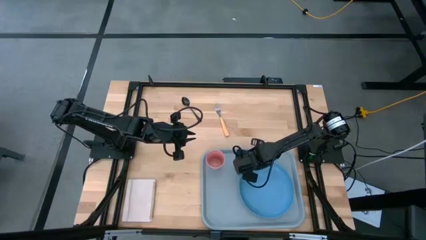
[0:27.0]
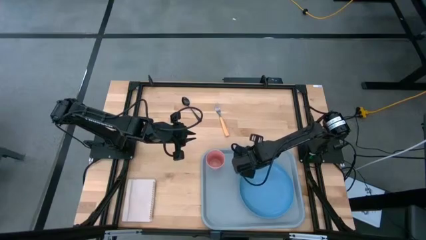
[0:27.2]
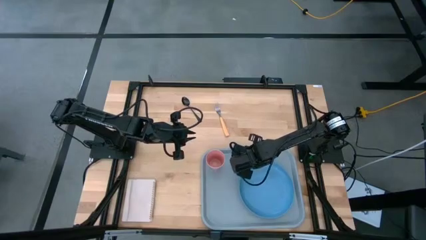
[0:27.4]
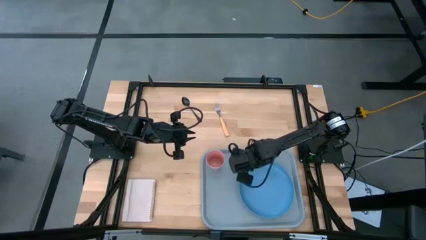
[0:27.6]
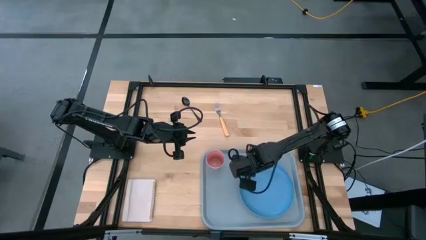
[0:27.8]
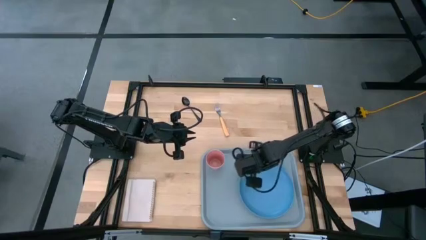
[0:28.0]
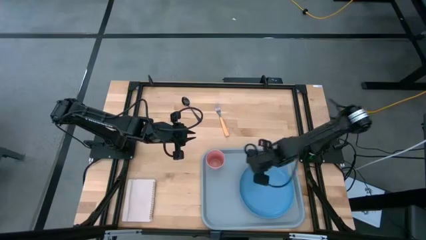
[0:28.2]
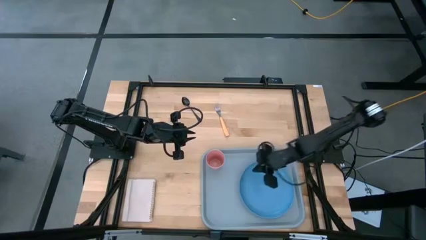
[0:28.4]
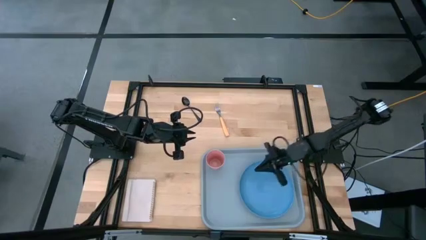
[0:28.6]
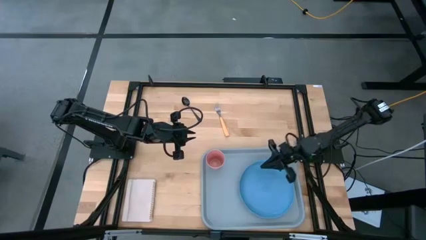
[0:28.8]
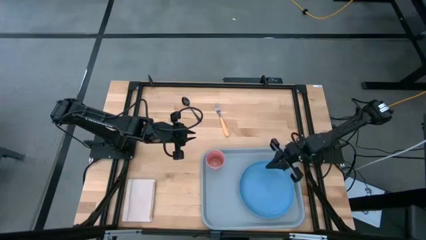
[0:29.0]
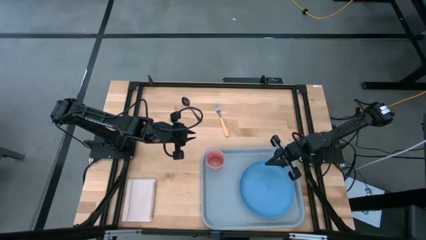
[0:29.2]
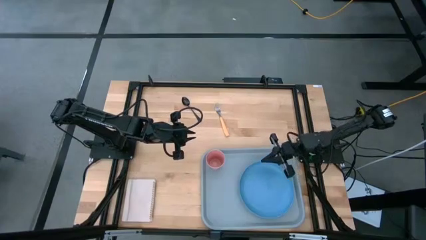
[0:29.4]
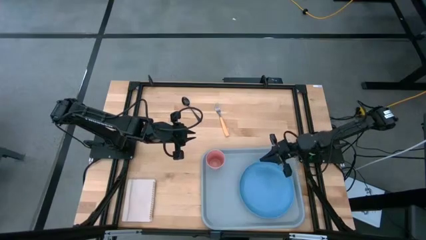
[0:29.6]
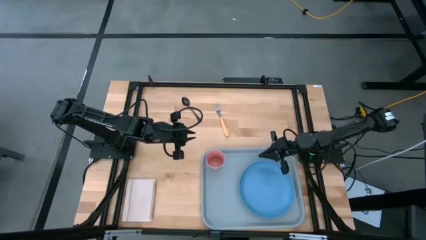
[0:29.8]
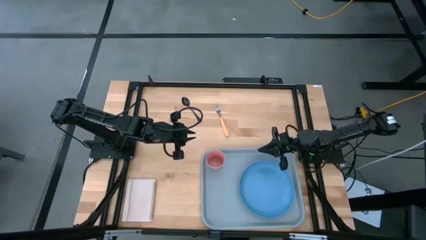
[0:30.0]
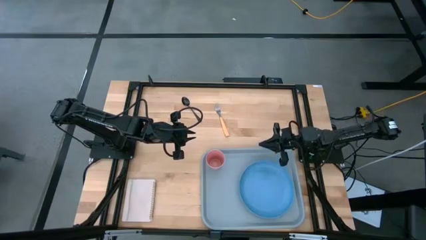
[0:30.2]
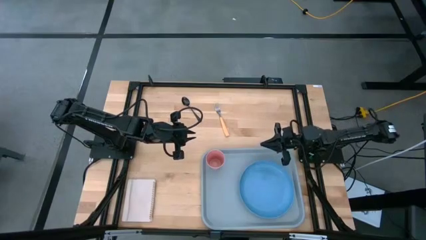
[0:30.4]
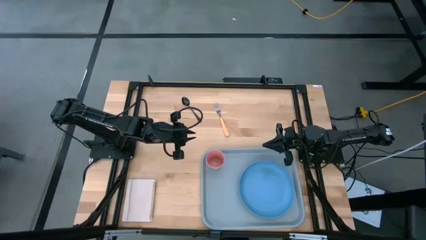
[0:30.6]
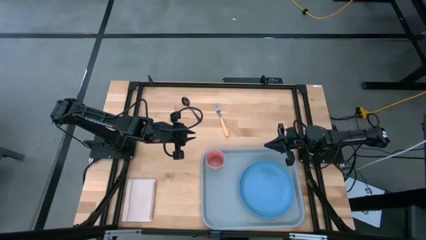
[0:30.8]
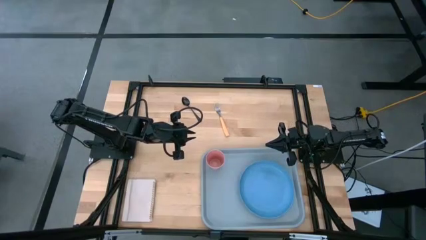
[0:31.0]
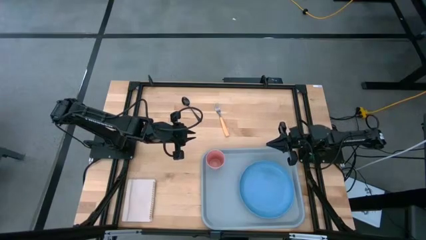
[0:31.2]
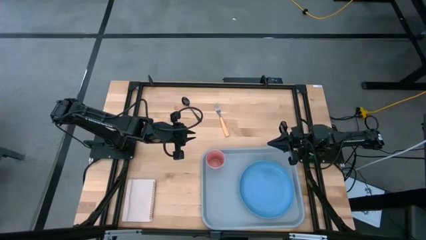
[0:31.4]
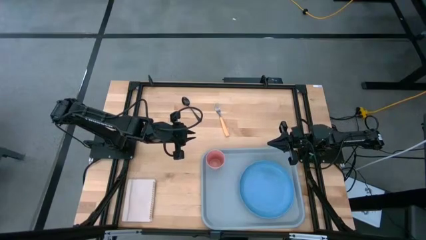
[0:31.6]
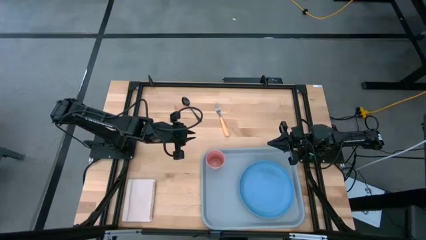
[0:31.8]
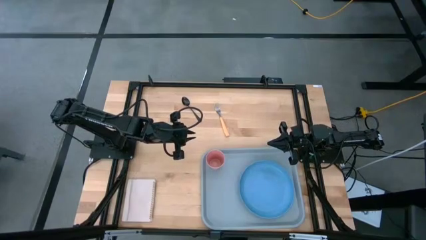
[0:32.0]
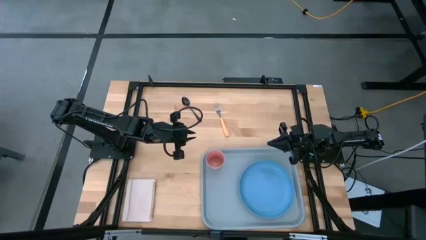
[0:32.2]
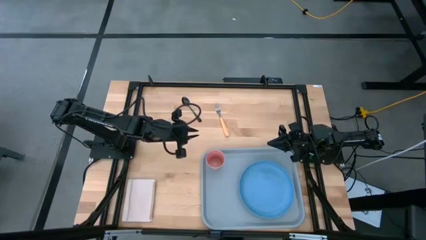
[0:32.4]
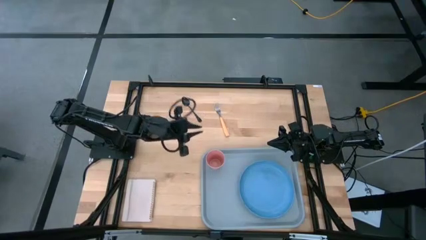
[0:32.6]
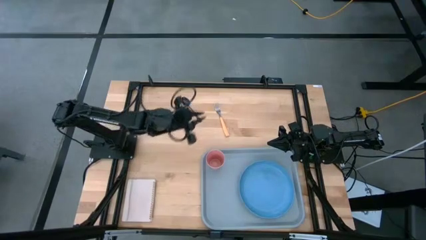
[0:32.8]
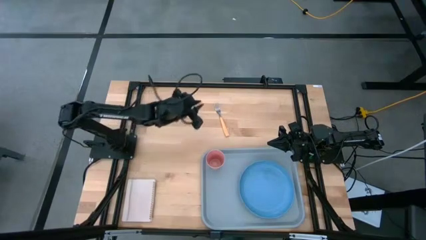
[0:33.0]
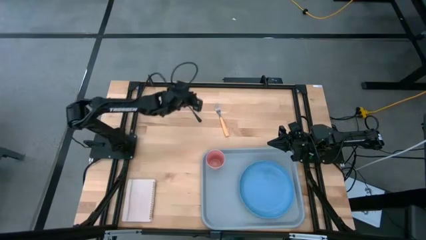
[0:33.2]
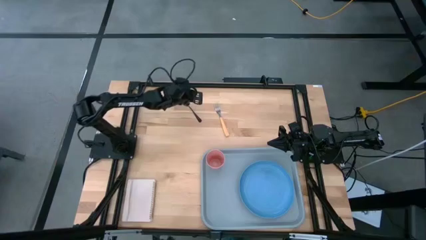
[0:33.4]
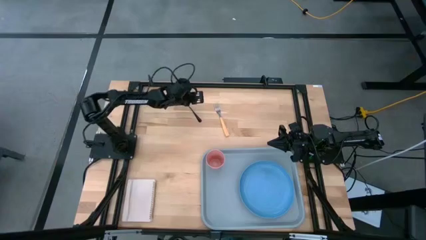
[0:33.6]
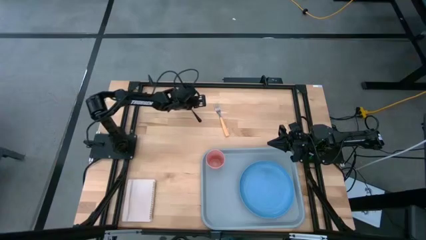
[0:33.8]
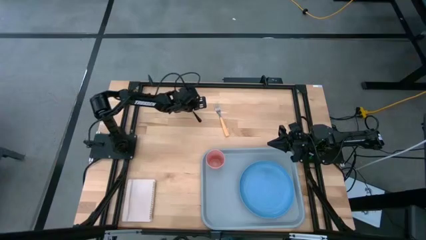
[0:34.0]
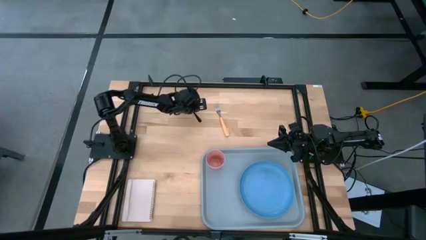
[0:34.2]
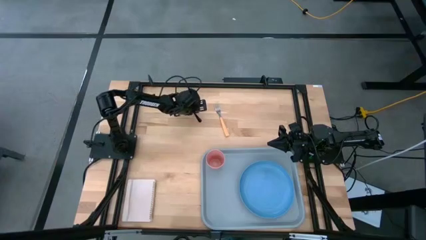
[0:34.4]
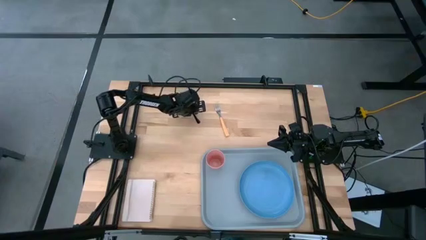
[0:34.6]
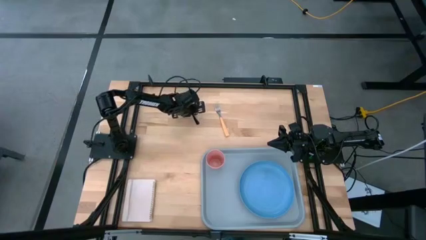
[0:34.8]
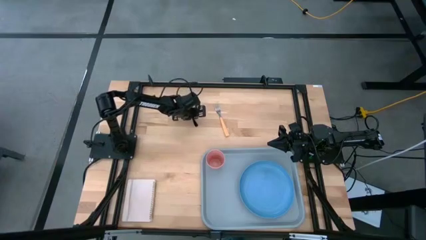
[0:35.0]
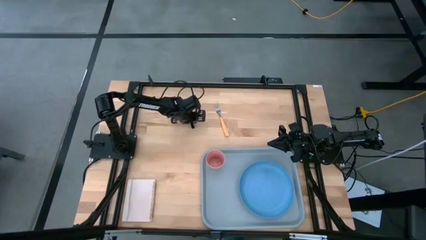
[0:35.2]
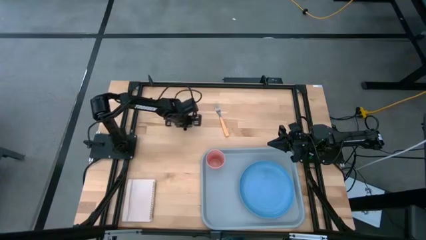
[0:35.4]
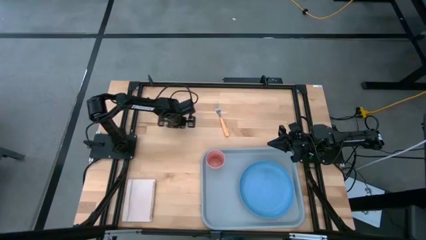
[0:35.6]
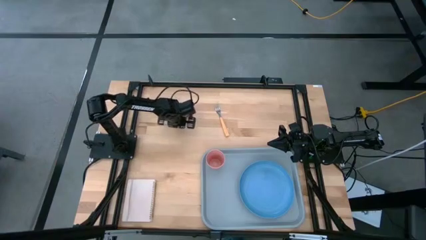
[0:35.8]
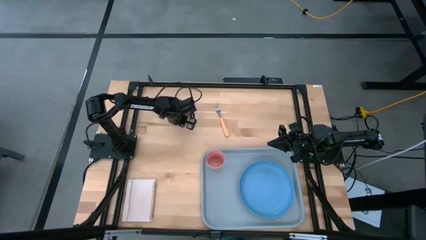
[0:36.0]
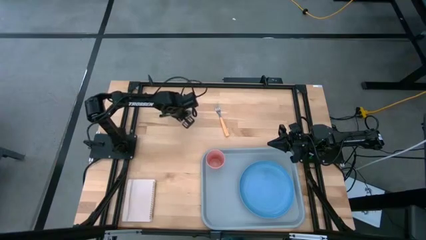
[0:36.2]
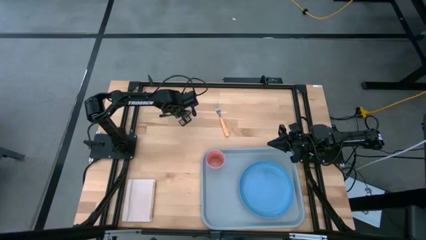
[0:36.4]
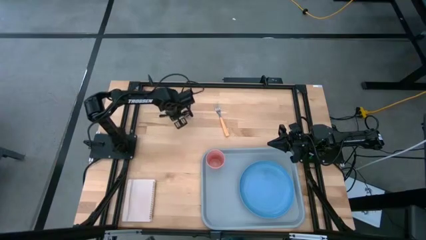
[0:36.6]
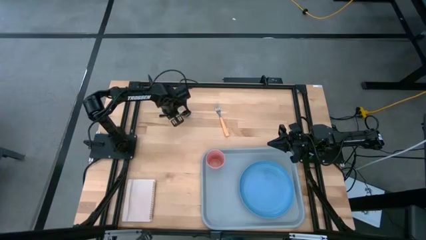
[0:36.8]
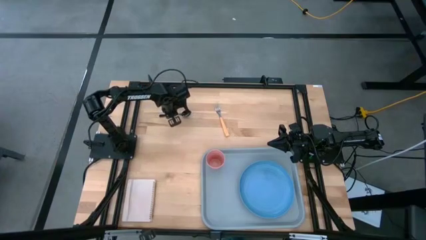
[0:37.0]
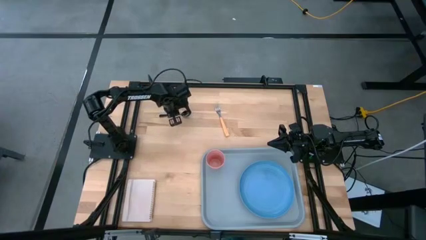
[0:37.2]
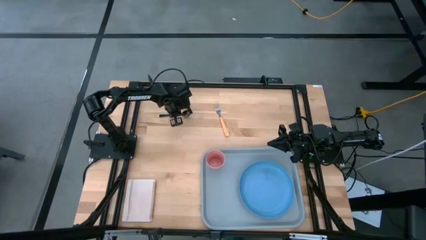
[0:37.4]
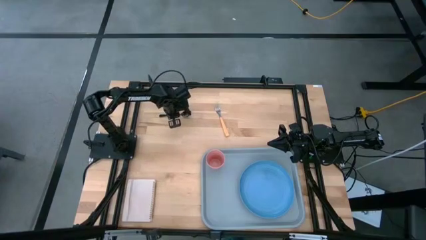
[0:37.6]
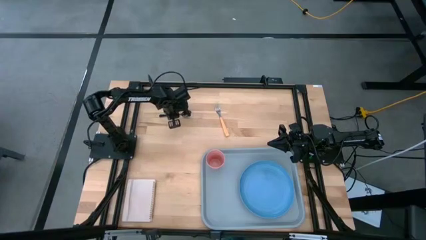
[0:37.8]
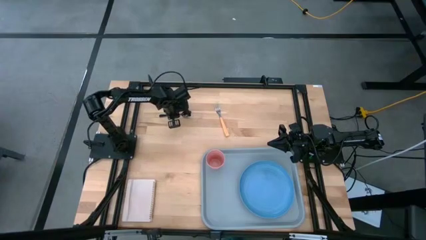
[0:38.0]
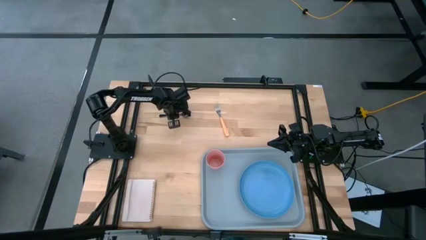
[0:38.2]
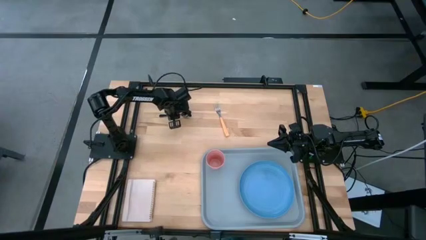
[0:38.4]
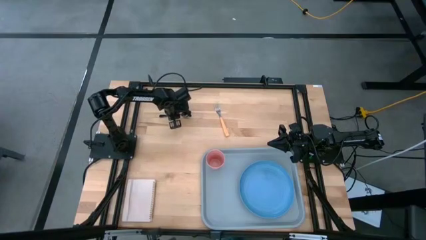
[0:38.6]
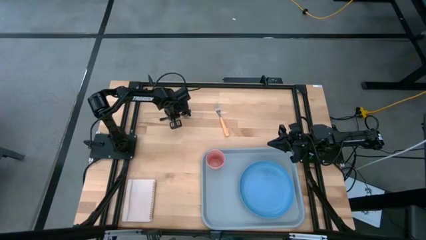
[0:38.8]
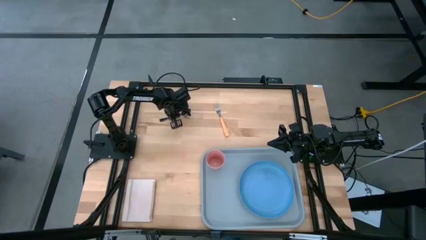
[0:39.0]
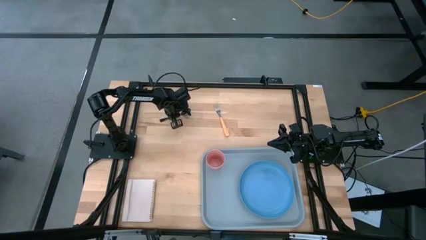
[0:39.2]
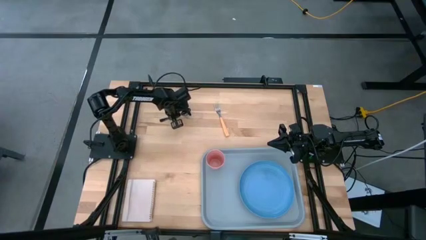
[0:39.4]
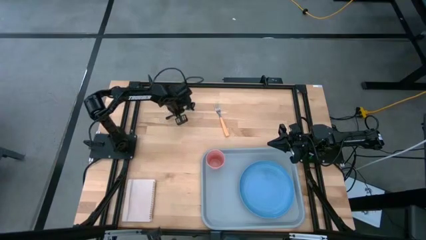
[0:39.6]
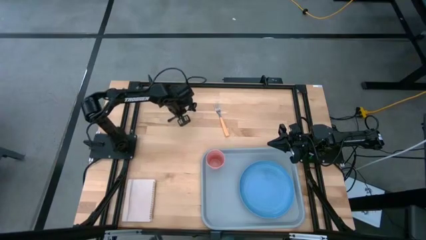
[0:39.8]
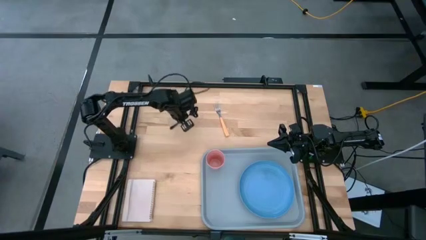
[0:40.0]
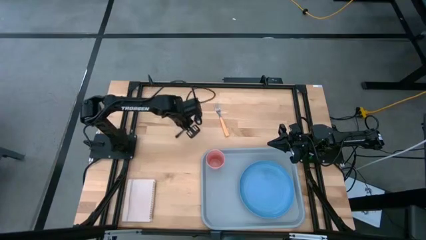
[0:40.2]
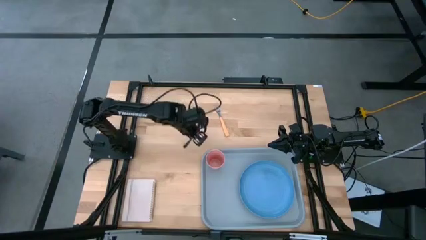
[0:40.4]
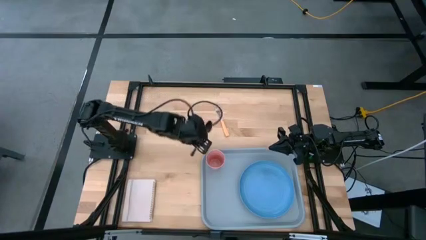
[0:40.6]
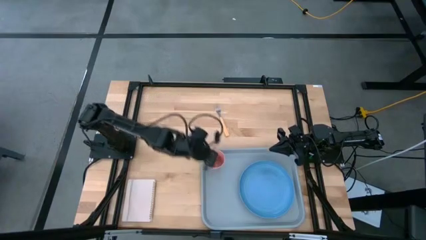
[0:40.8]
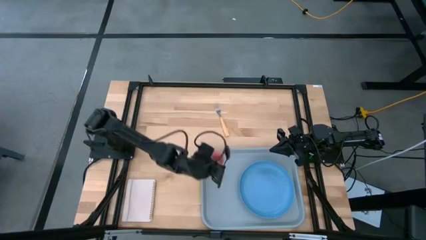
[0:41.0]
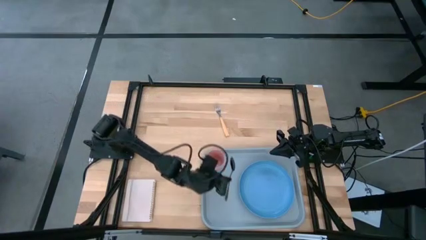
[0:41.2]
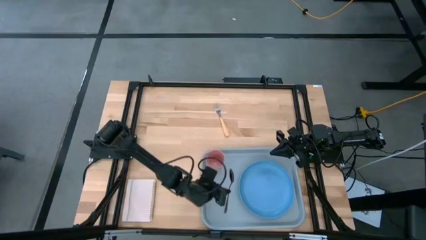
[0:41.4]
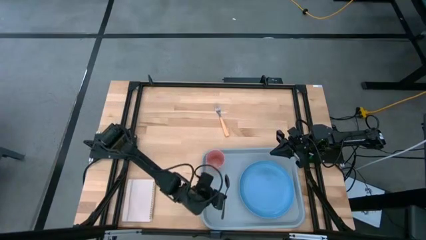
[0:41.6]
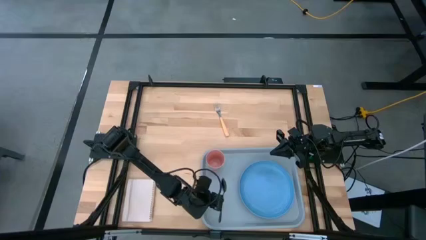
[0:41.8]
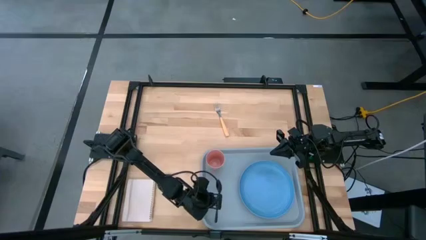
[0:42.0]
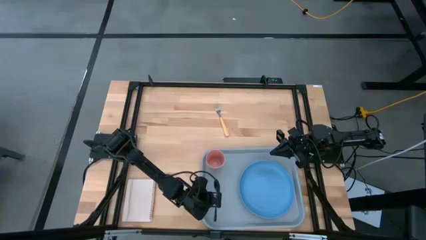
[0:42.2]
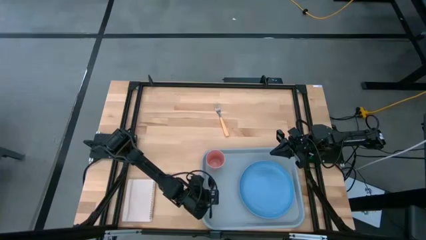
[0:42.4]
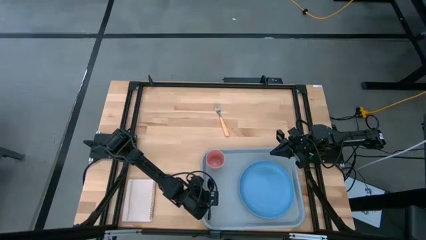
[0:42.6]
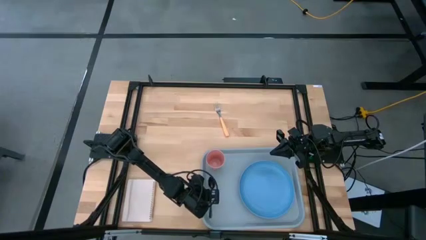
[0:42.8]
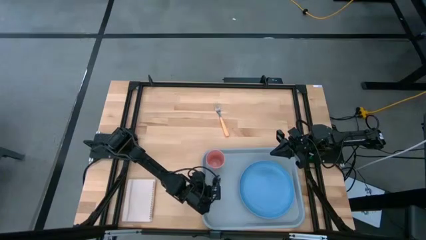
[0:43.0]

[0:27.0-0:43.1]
Task: Pick and place plate/cup/fork/spoon on tray
Put the black spoon on the gray tray to the bottom of the pink cup
